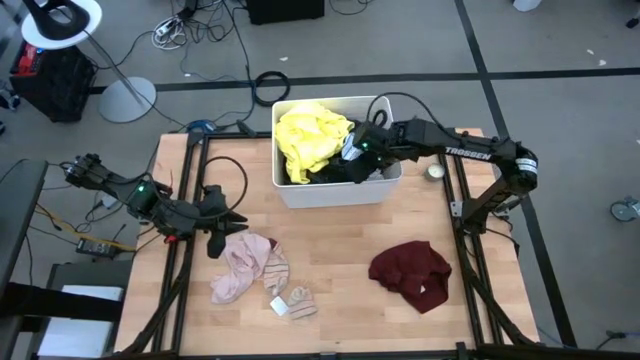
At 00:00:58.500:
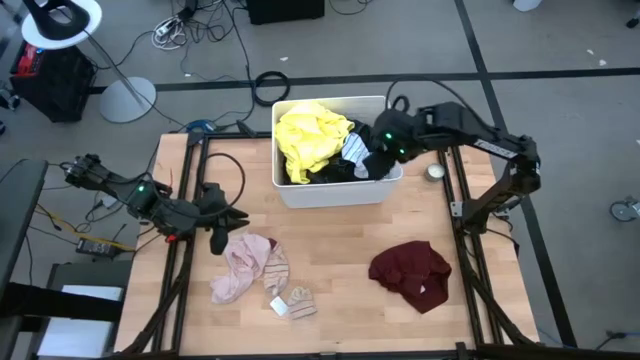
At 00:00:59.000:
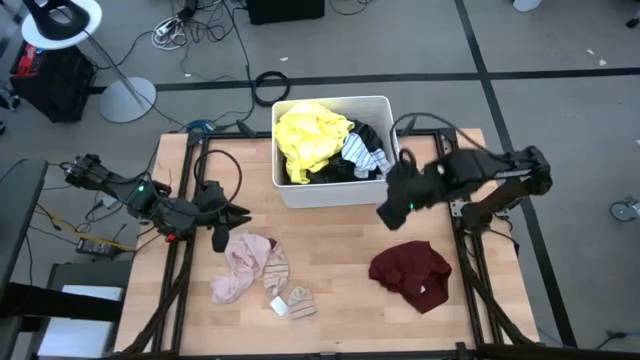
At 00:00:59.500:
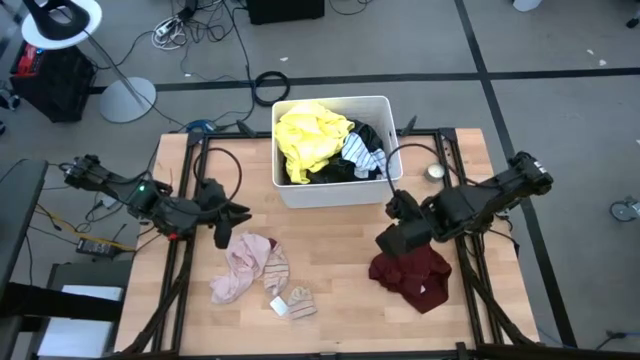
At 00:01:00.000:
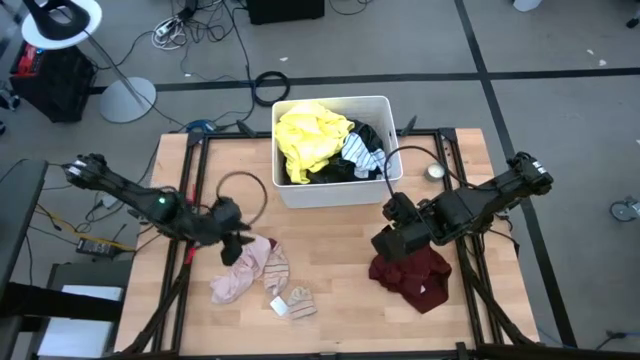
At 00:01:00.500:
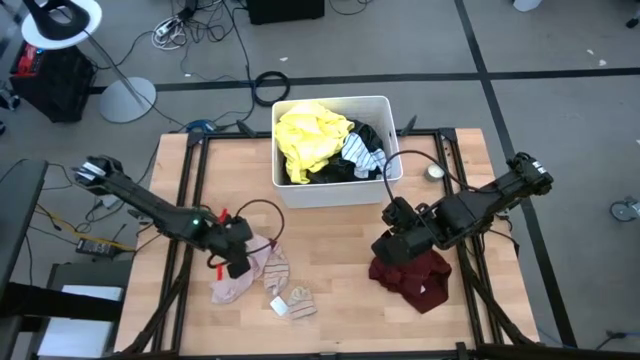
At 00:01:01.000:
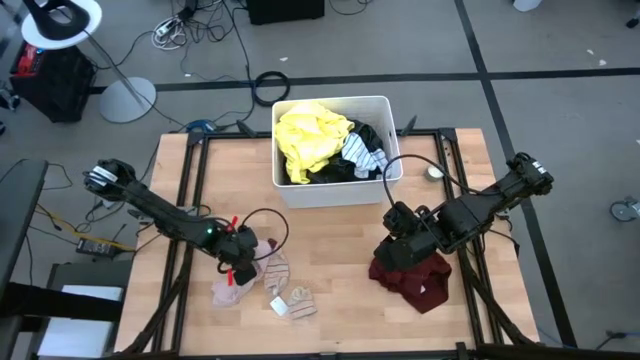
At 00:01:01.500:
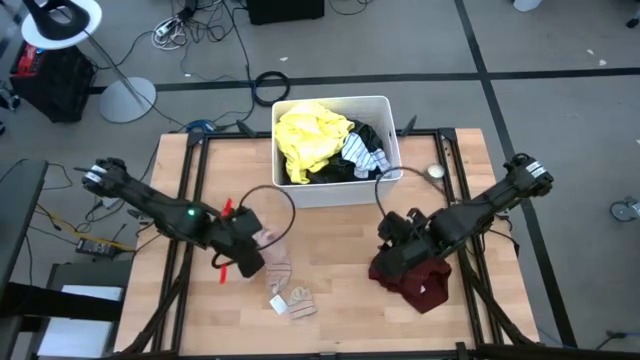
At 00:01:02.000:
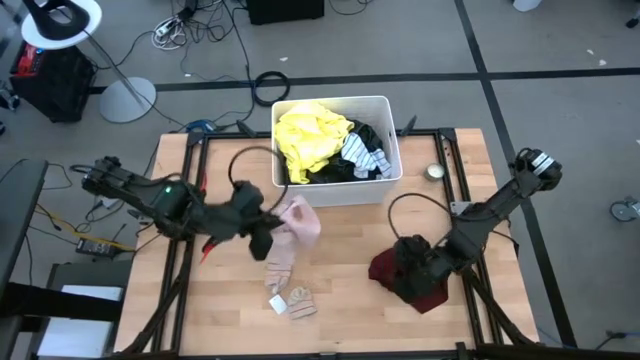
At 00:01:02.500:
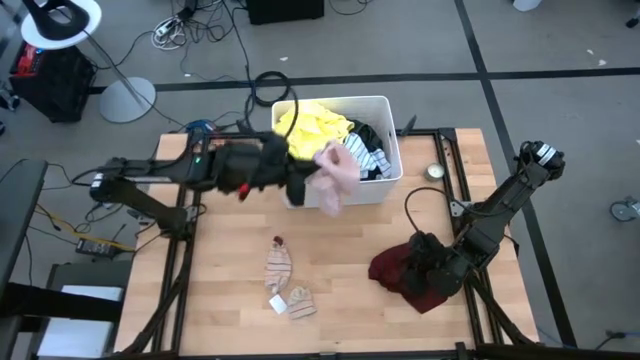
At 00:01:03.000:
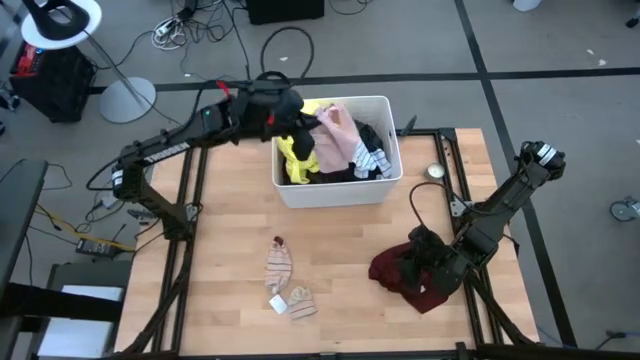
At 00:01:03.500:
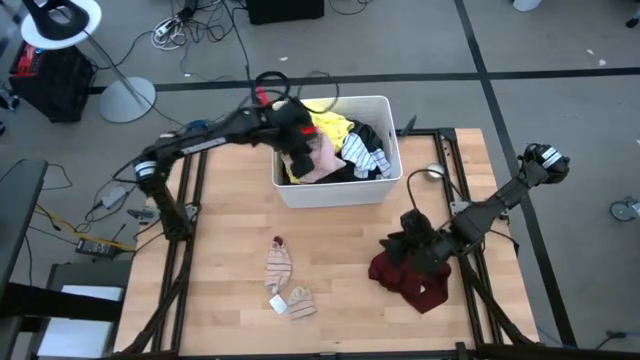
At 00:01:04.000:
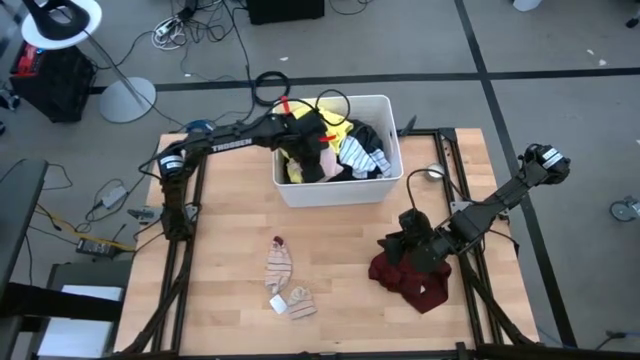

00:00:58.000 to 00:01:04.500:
Task: Sort clothes
Put the pink underwear into the white laundry bin

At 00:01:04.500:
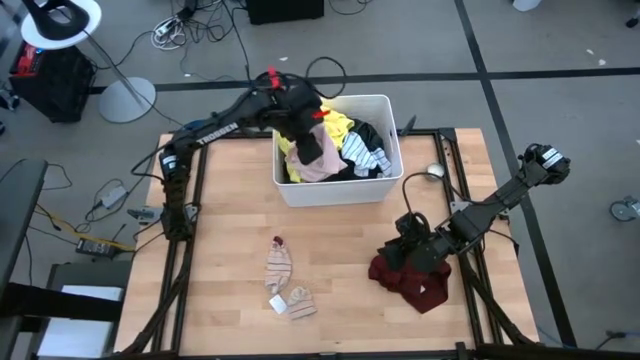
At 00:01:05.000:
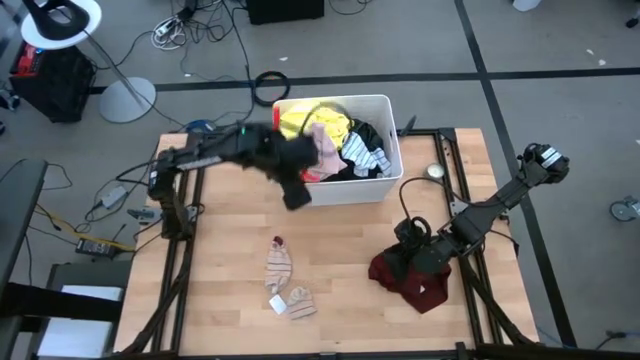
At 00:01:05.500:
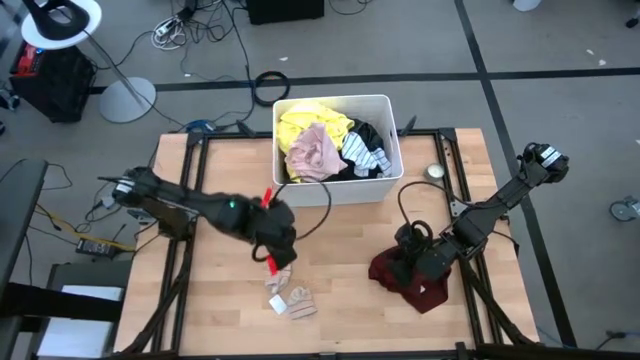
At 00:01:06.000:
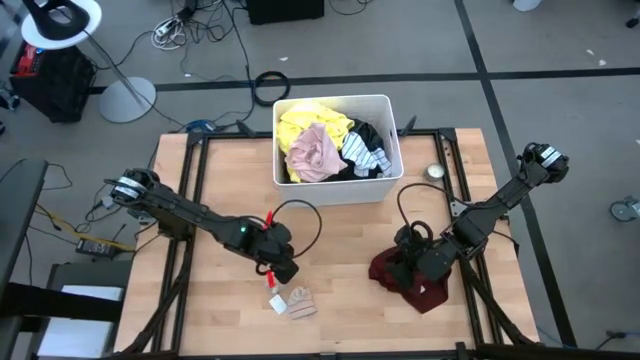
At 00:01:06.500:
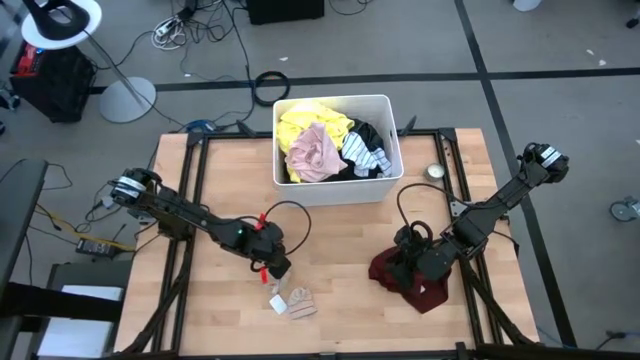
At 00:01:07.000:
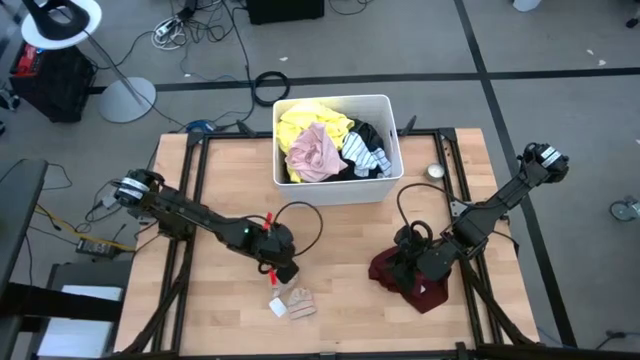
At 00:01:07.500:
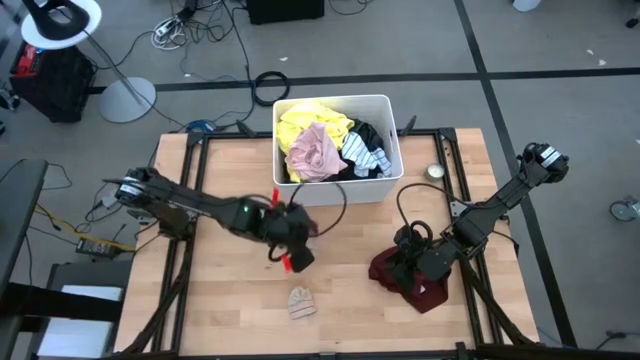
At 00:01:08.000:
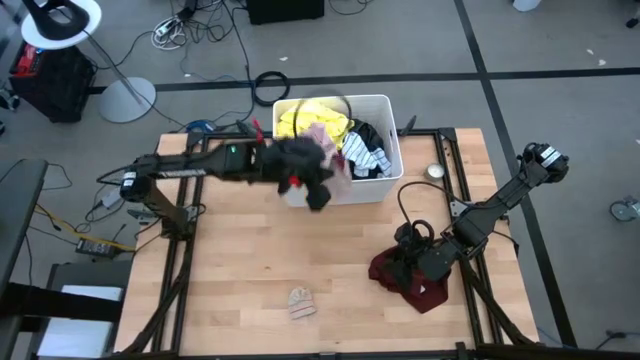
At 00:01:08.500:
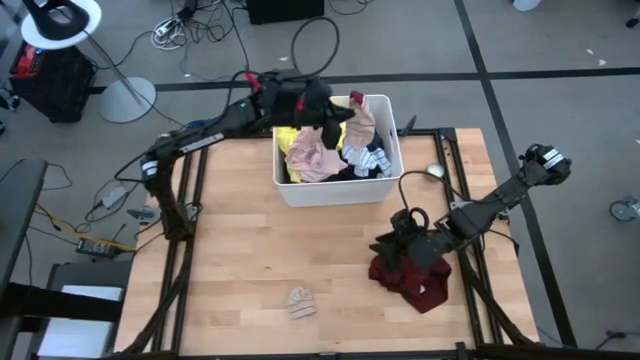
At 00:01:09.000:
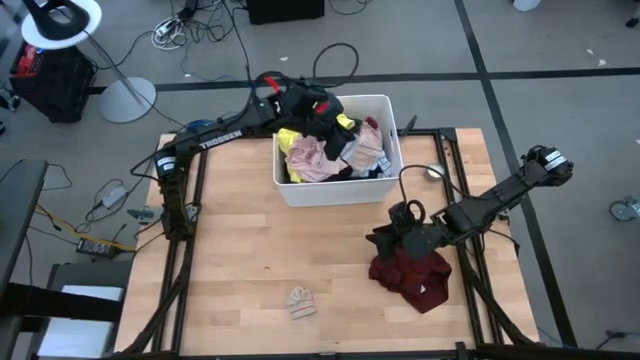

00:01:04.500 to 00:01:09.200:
Put the top light pink sock into the white laundry bin

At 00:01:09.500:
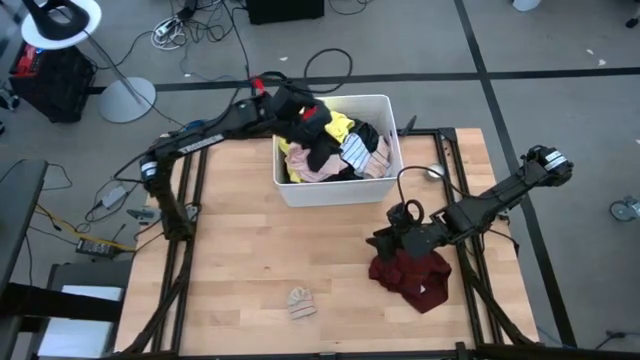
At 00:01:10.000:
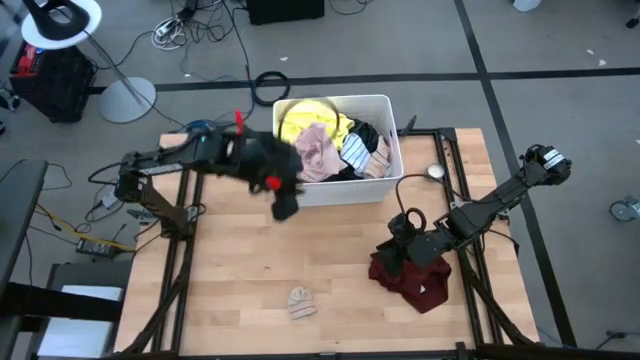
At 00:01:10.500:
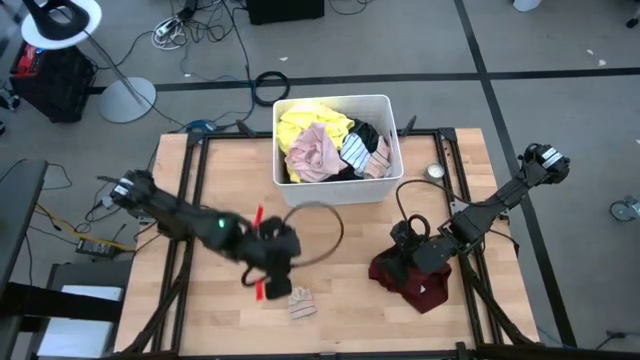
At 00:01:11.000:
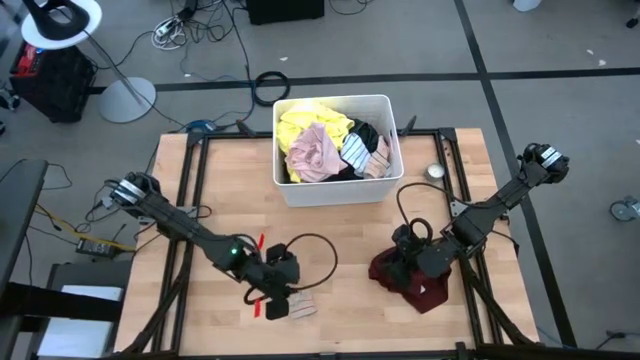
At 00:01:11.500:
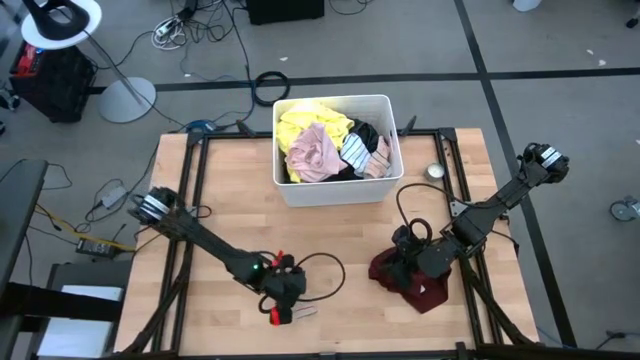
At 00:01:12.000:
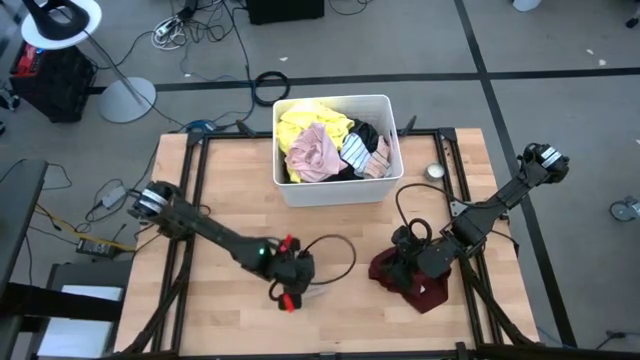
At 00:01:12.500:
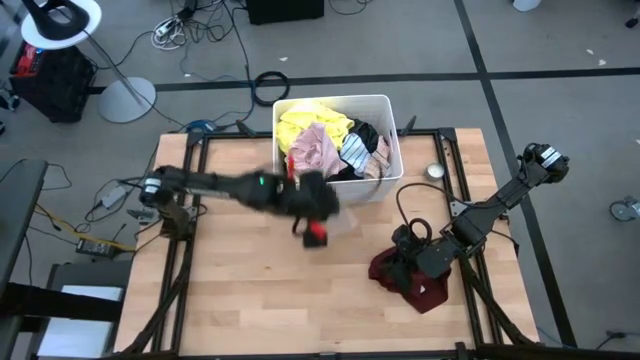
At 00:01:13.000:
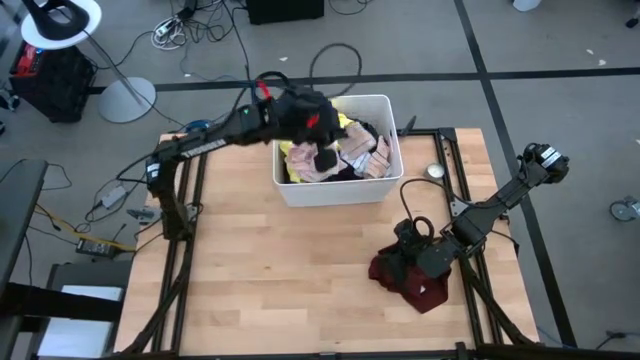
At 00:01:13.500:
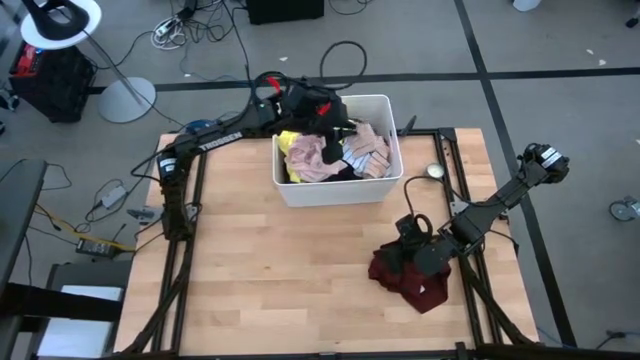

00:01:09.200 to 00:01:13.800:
Put the light pink sock into the white laundry bin

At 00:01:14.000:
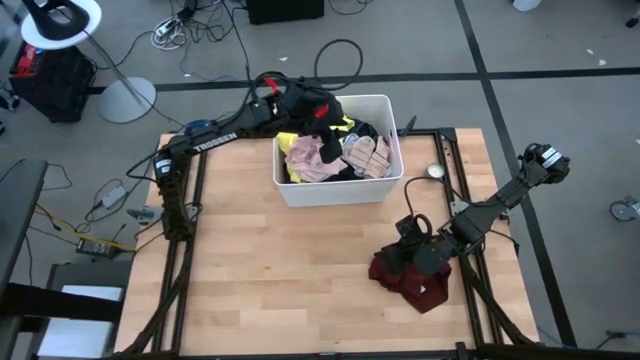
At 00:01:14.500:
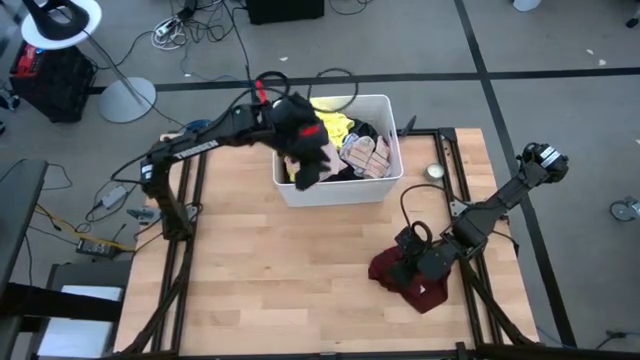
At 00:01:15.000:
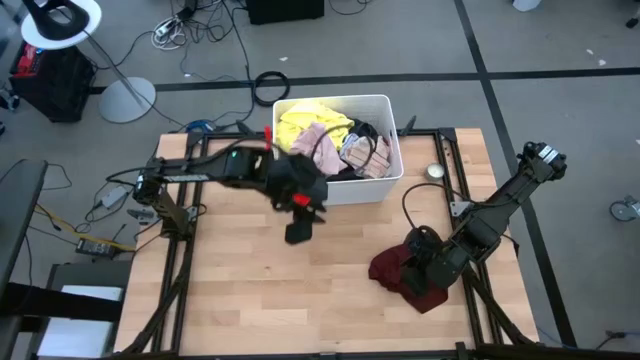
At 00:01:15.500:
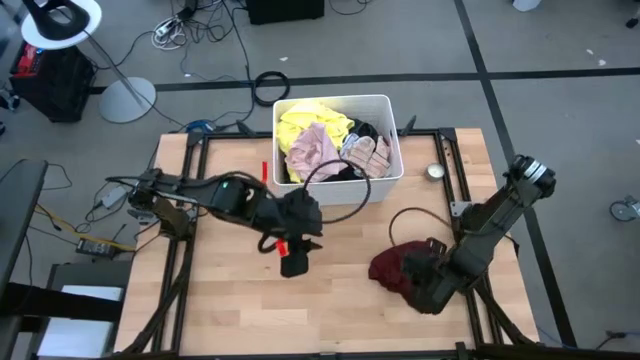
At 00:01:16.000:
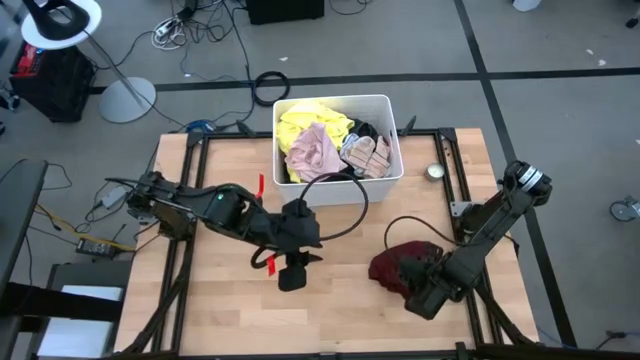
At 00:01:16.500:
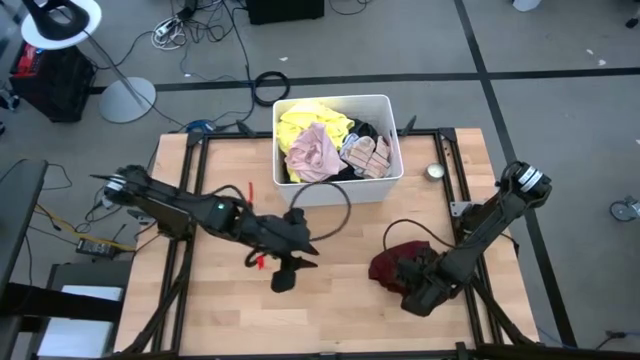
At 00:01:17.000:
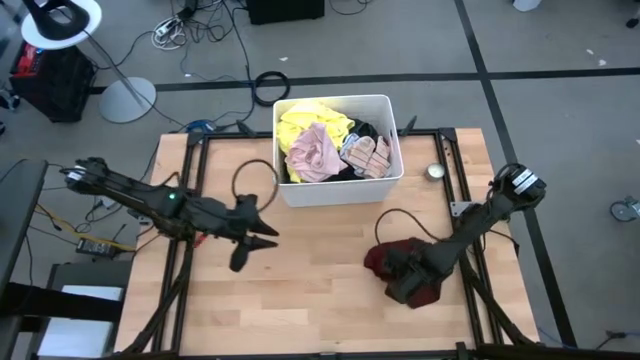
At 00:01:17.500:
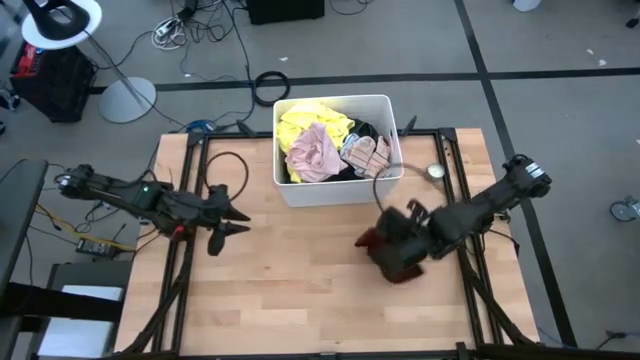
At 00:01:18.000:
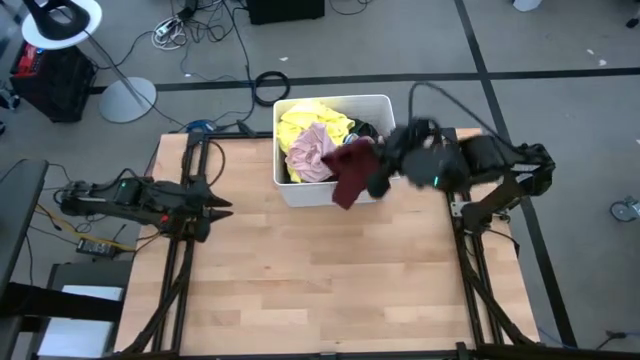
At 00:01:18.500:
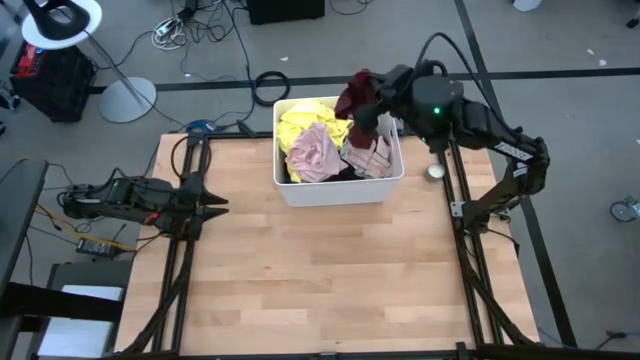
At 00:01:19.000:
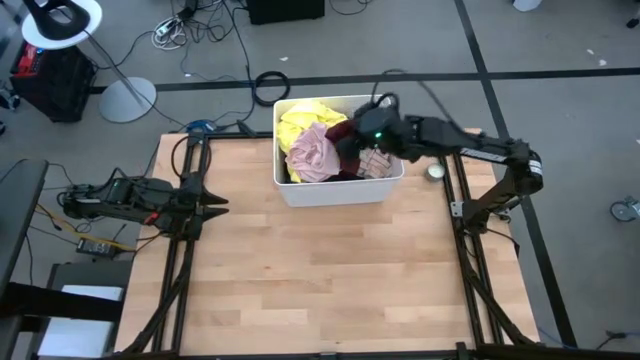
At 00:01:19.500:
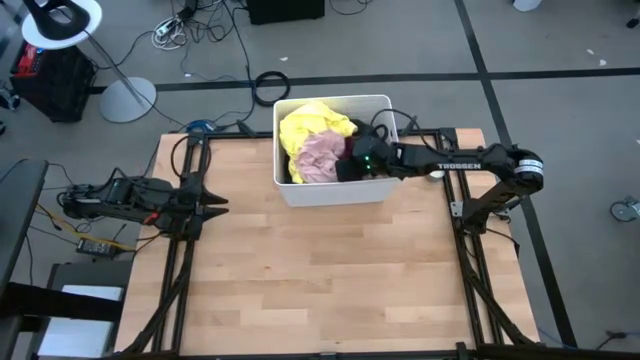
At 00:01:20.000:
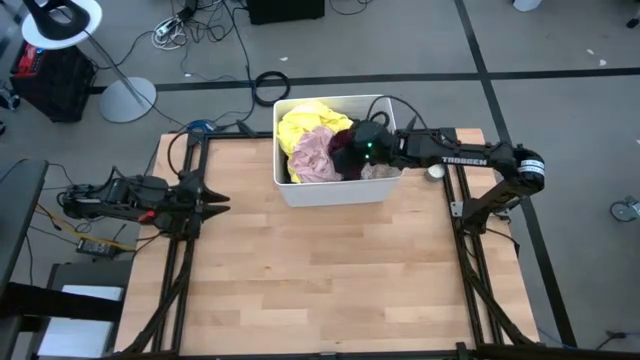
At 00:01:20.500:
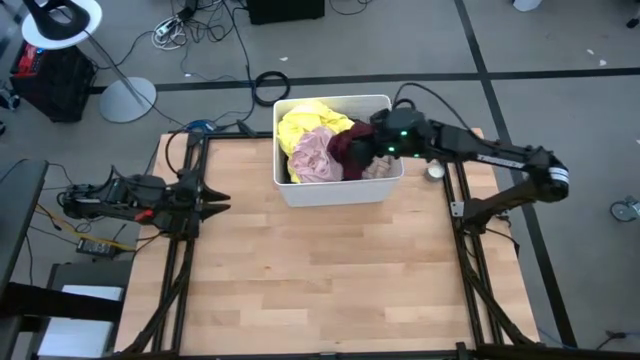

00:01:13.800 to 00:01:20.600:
Put the red underwear into the white laundry bin
